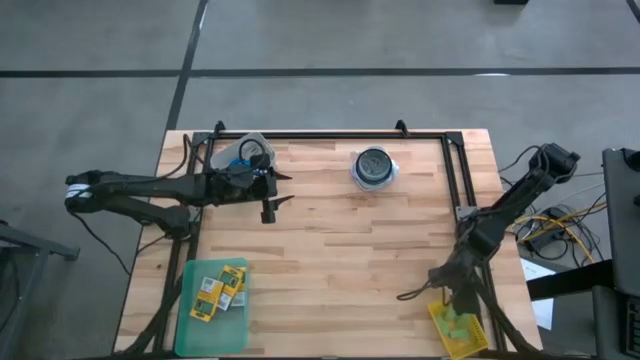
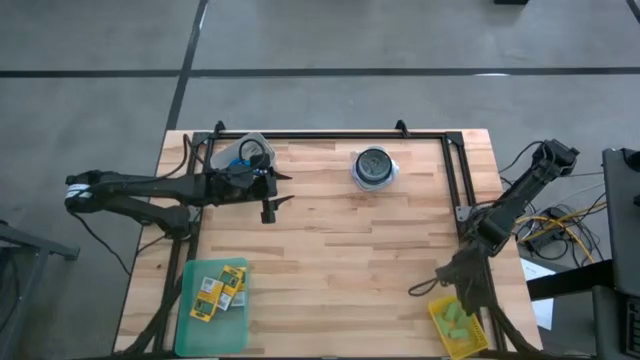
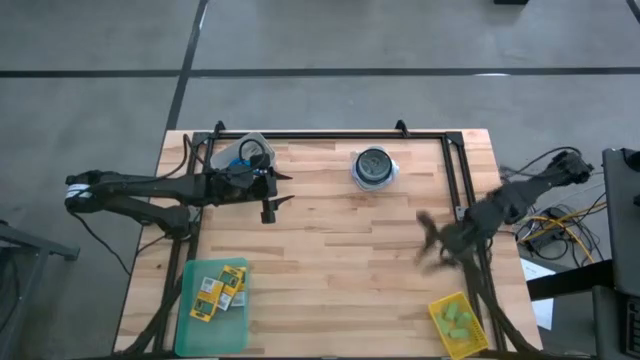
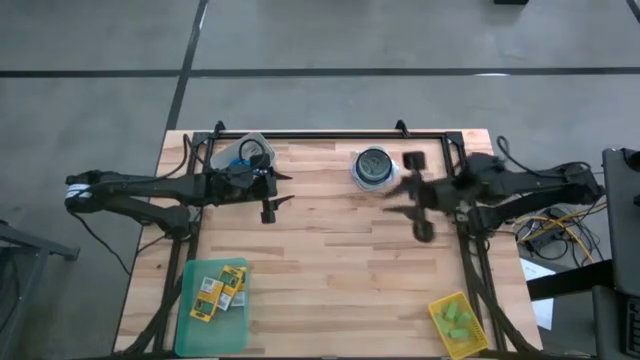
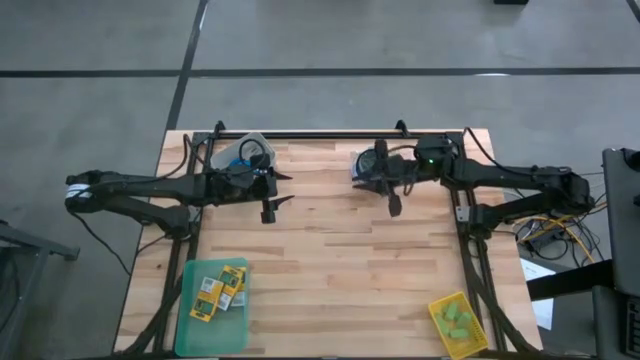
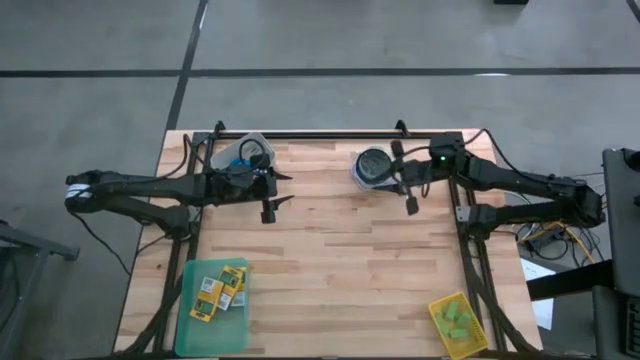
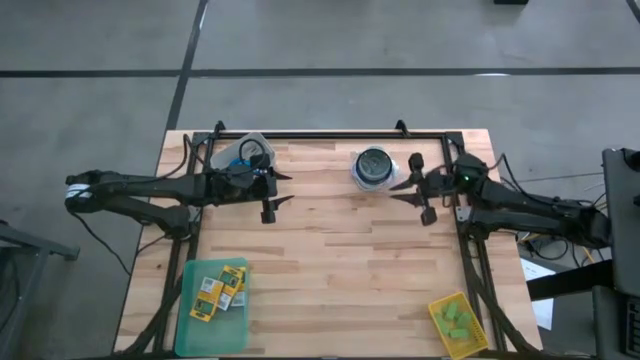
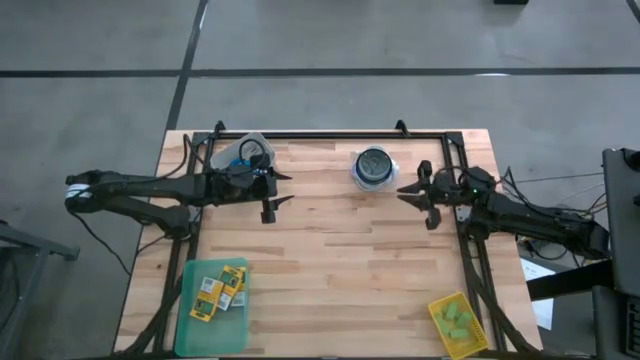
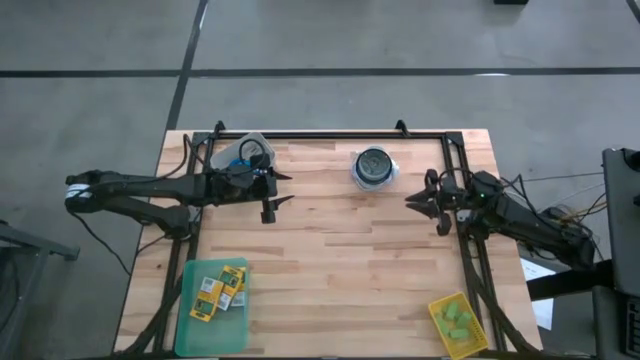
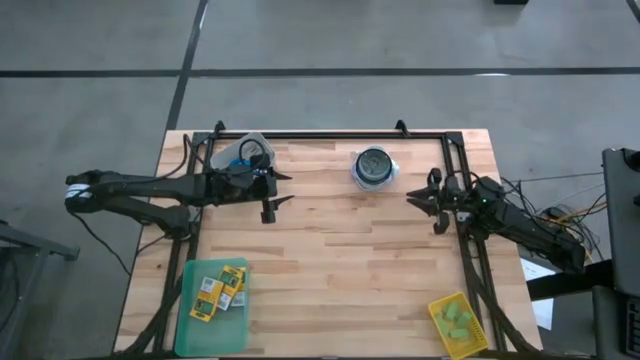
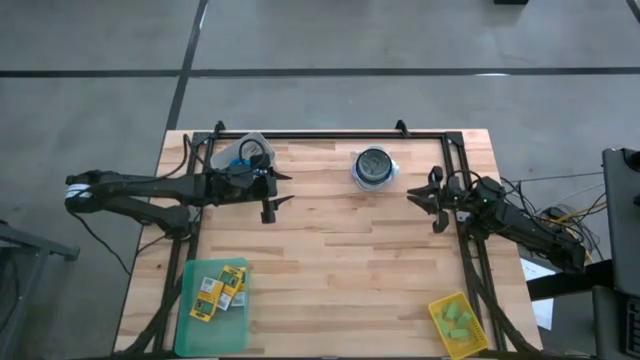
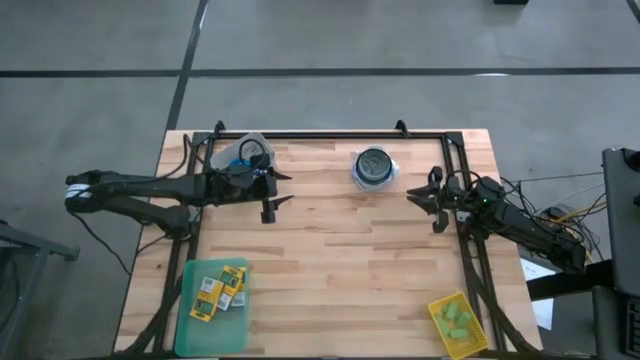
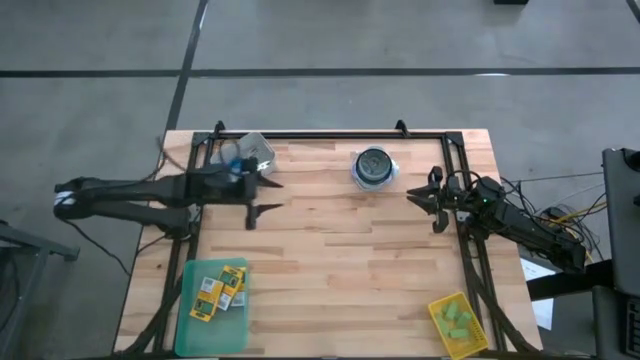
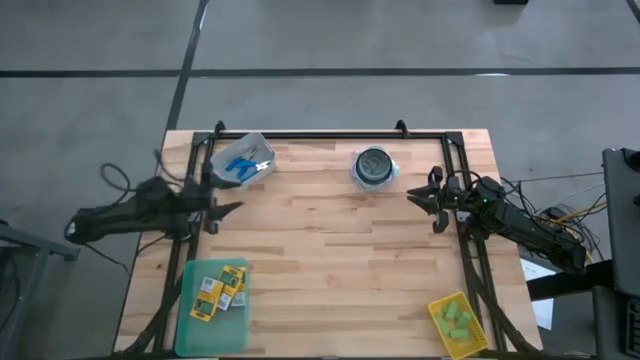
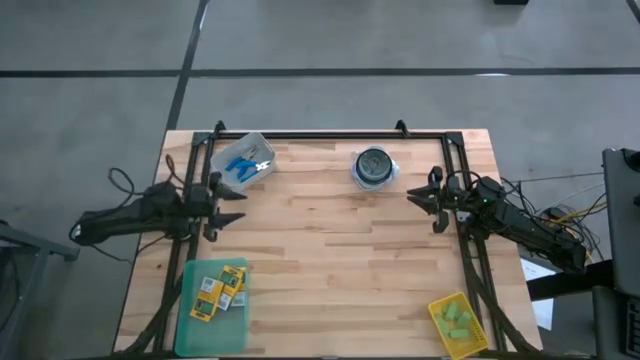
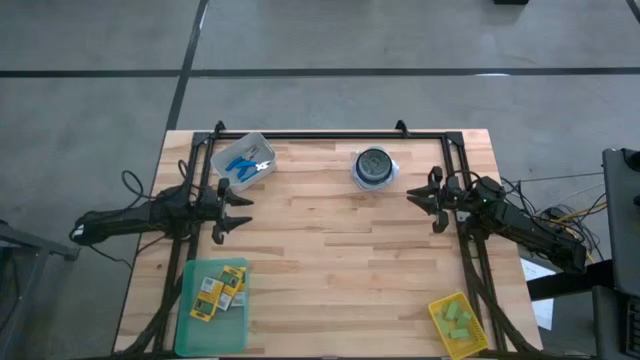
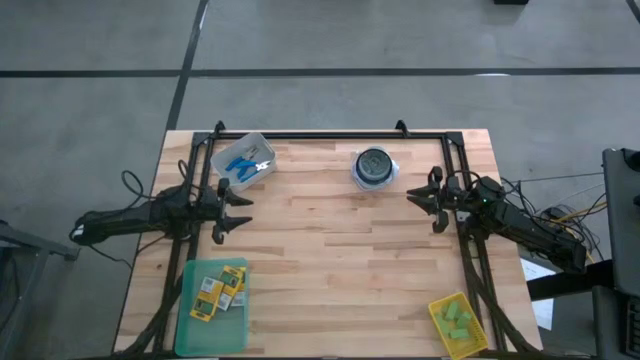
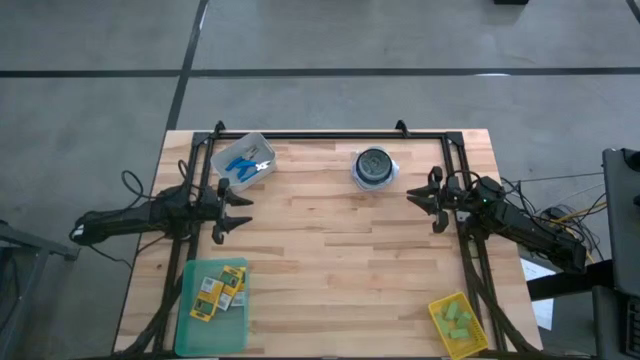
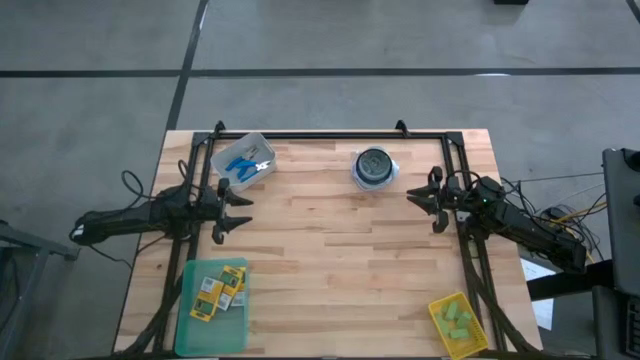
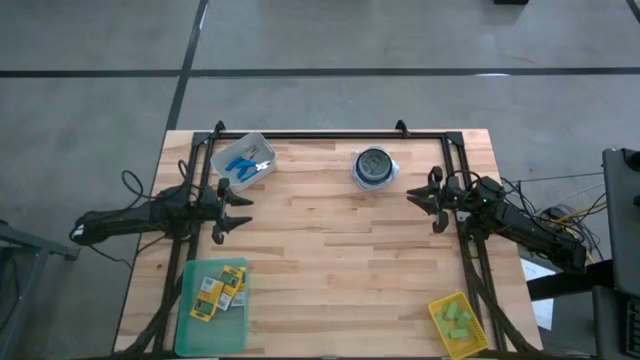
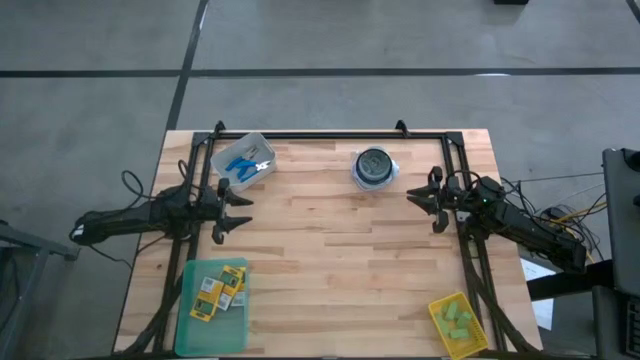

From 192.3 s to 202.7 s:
Task: Pick & Place School Supplies
Return to Home Position

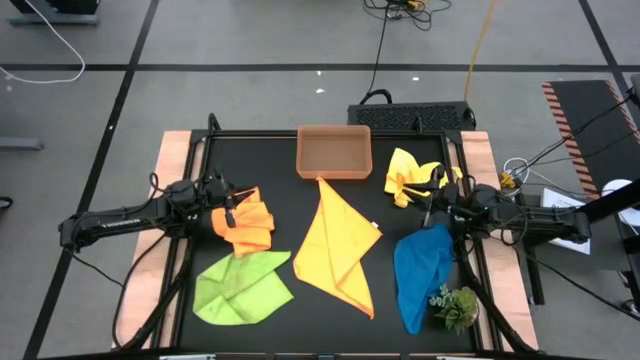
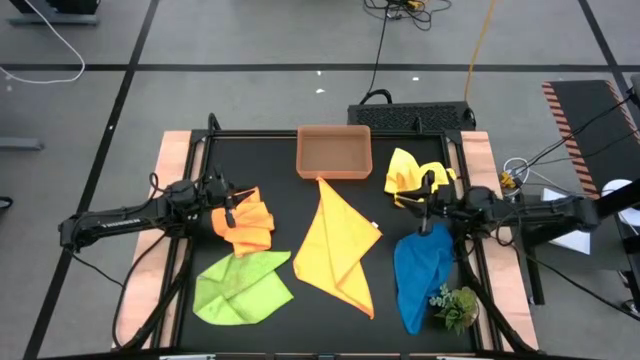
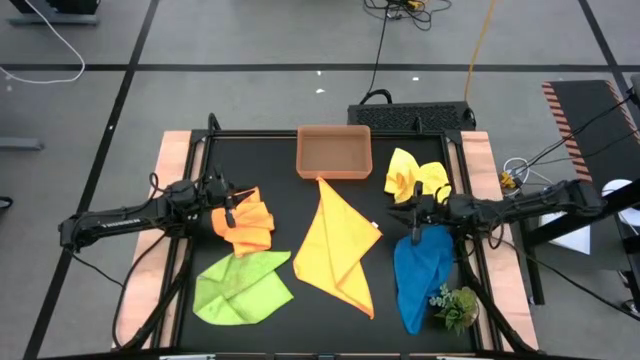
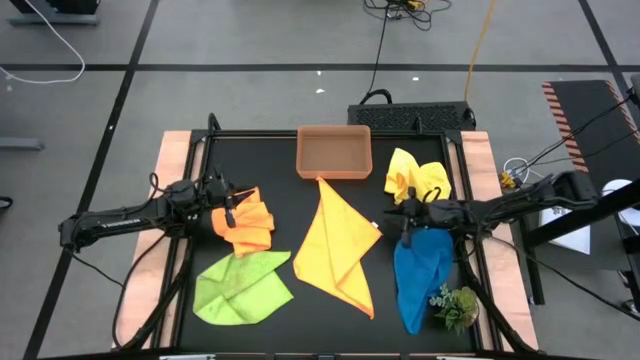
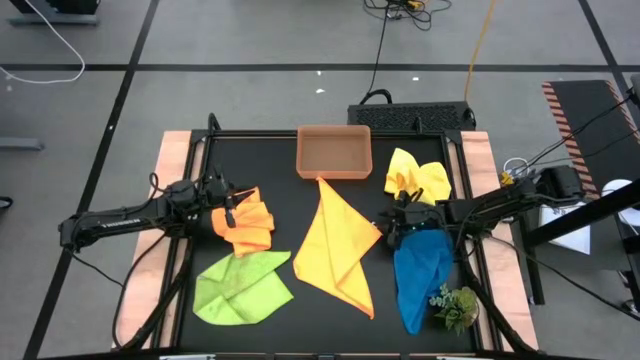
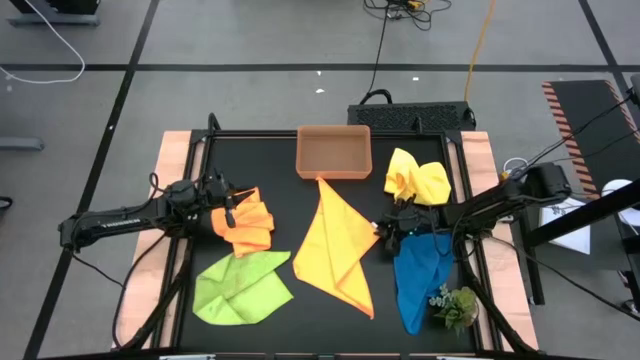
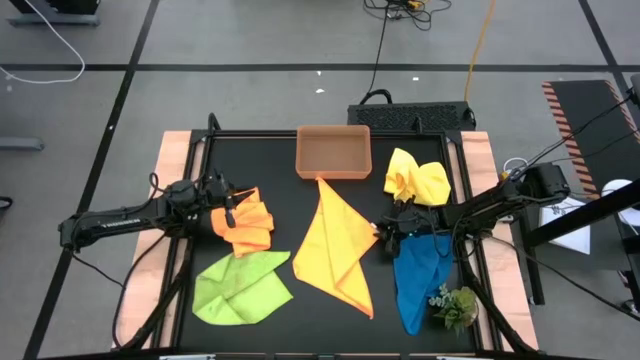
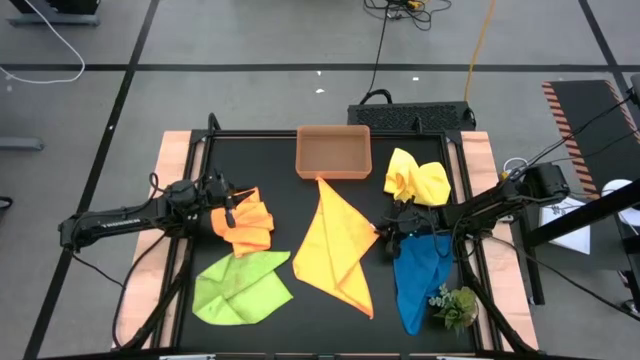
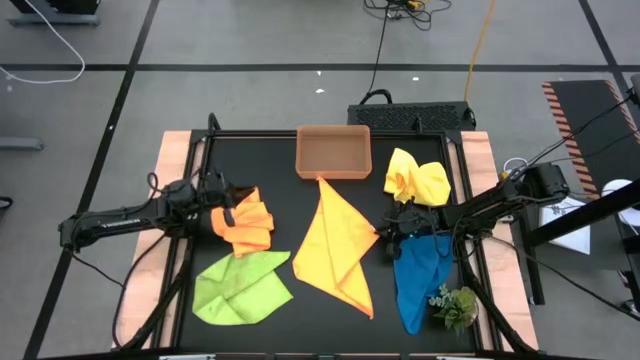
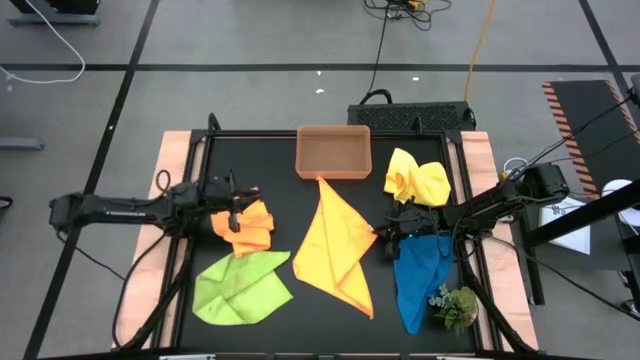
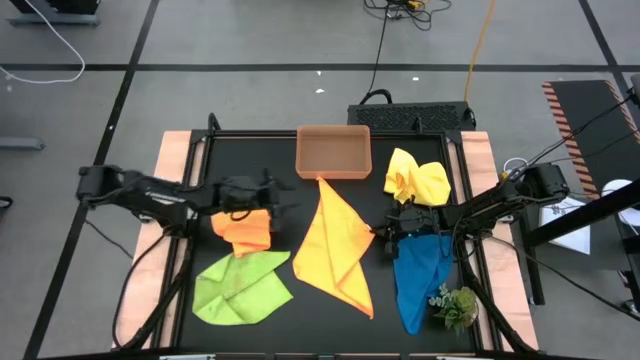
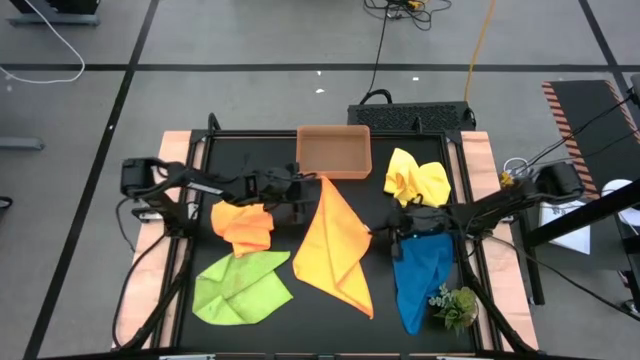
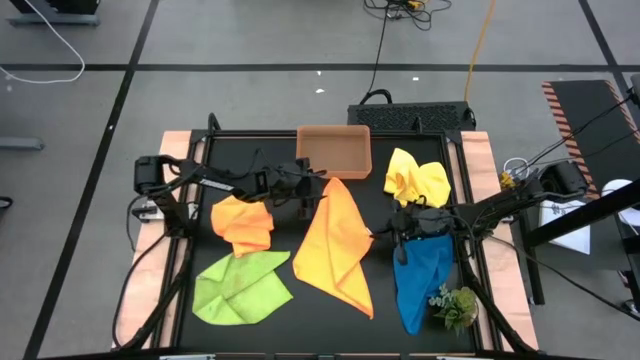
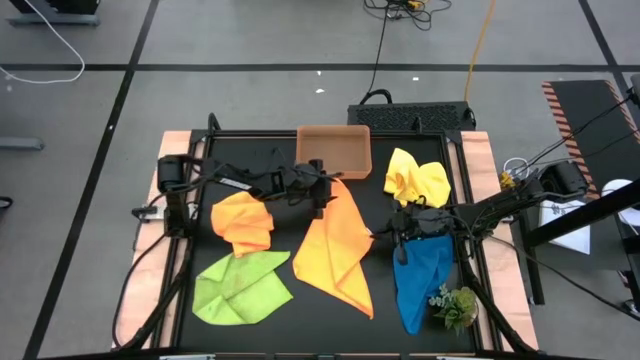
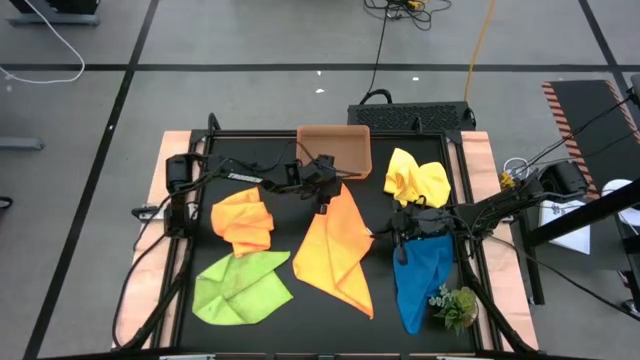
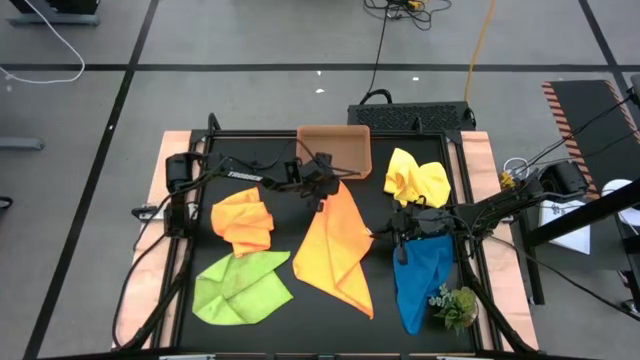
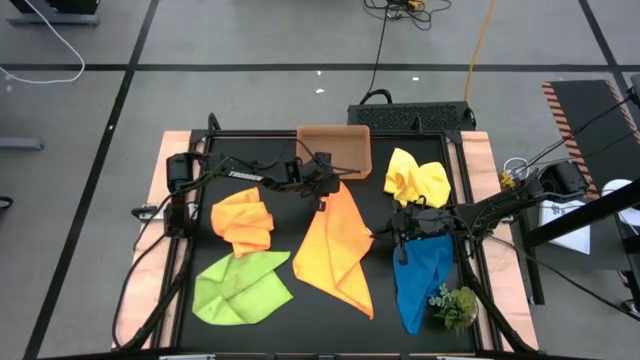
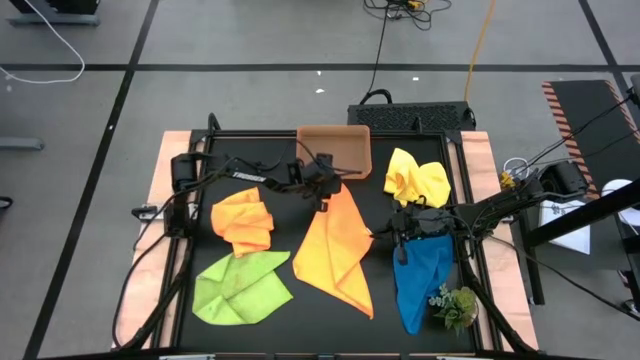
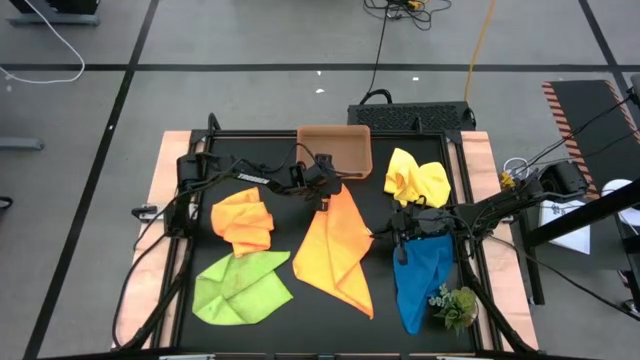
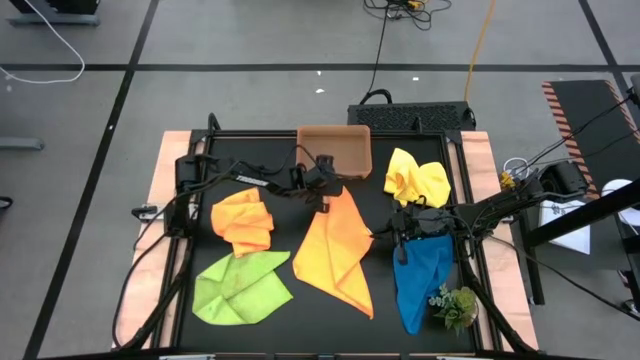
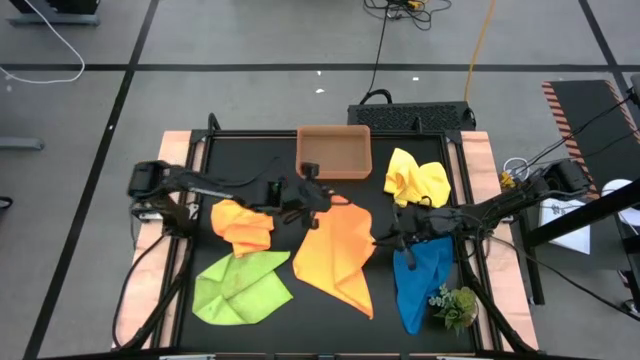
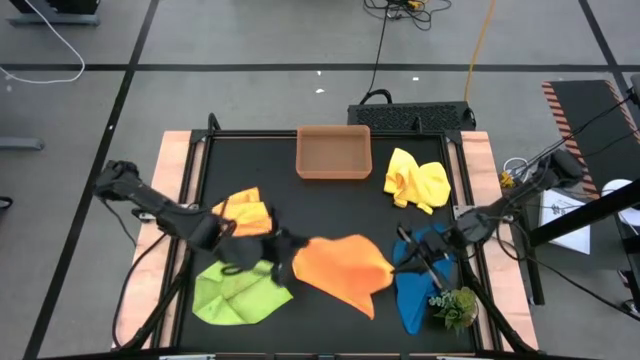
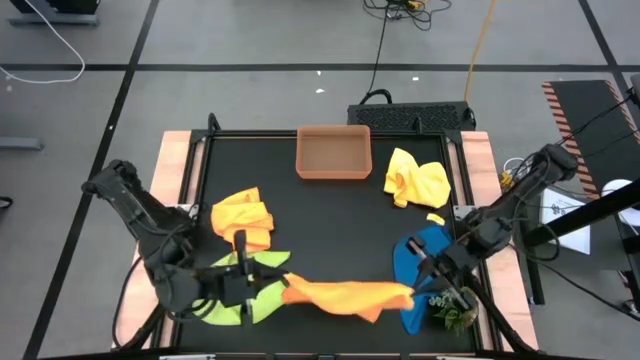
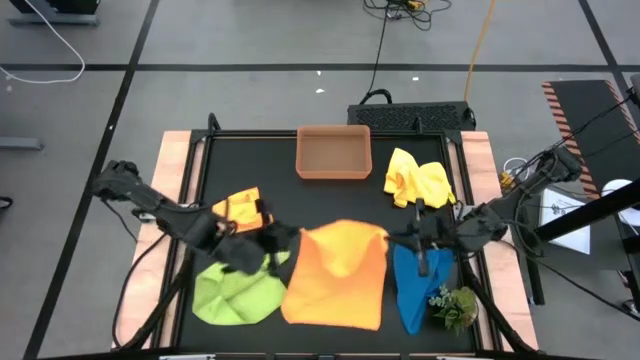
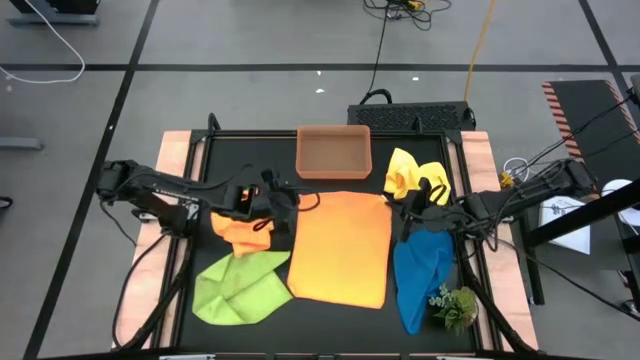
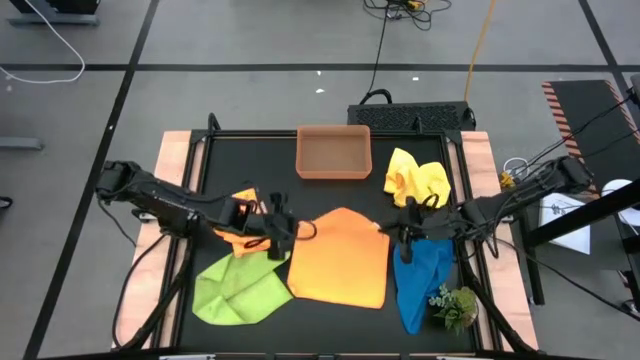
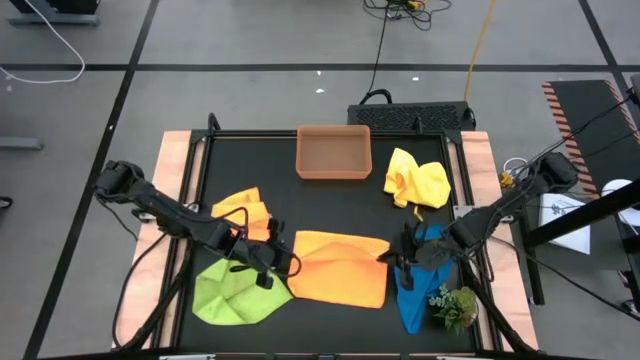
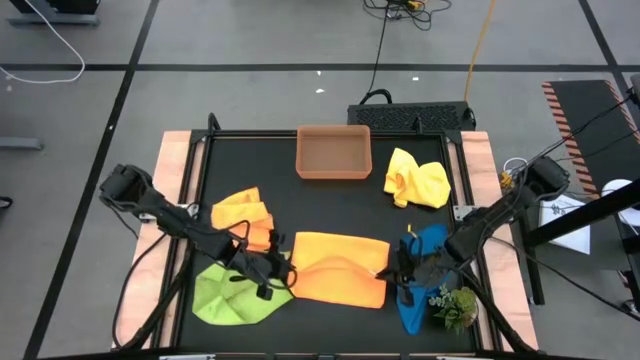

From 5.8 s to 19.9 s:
Task: Fold microfiber towels
Fold the right orange microfiber towel
